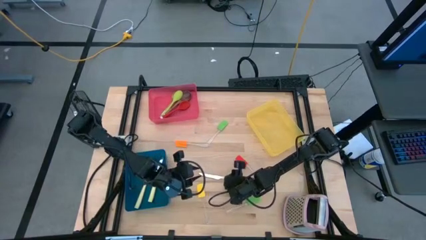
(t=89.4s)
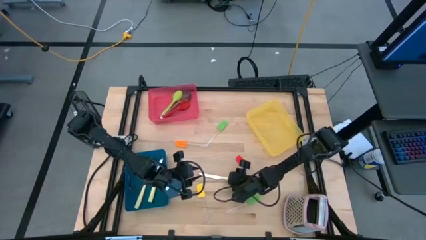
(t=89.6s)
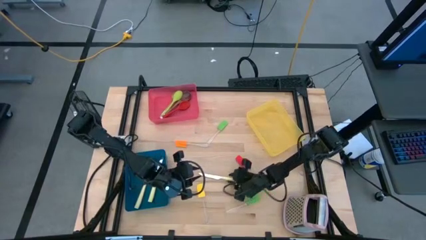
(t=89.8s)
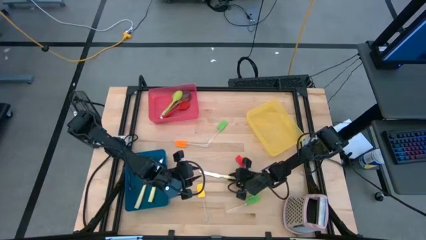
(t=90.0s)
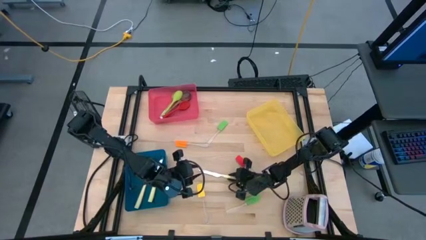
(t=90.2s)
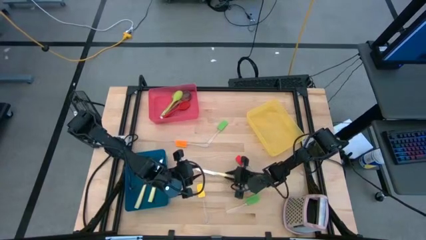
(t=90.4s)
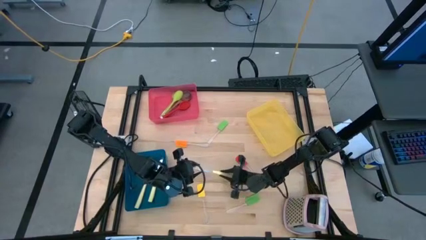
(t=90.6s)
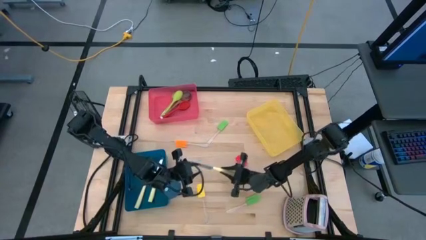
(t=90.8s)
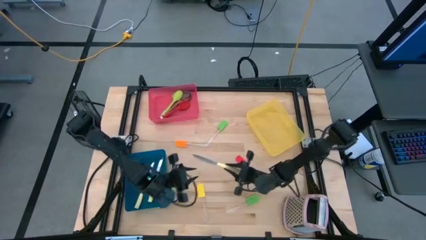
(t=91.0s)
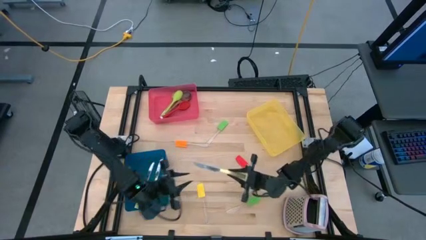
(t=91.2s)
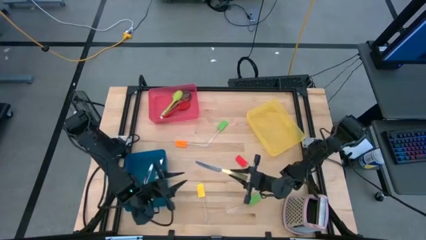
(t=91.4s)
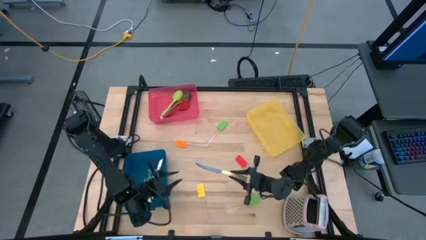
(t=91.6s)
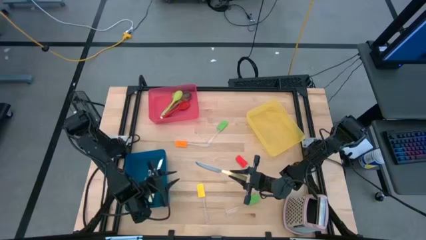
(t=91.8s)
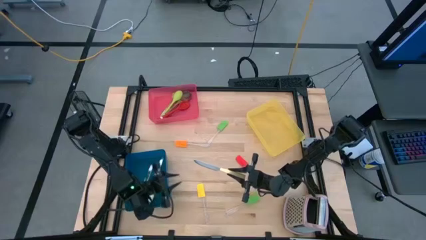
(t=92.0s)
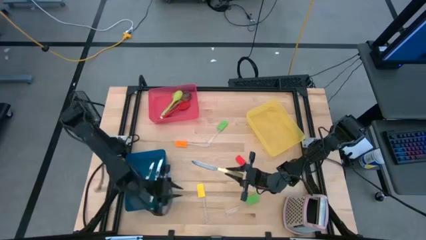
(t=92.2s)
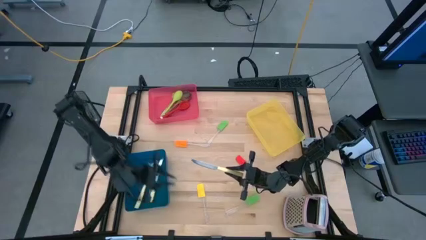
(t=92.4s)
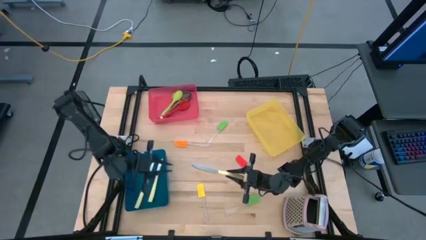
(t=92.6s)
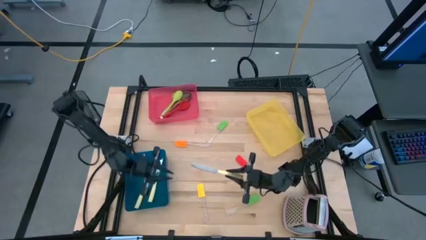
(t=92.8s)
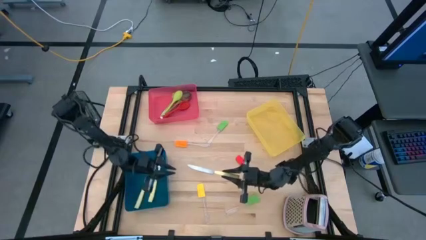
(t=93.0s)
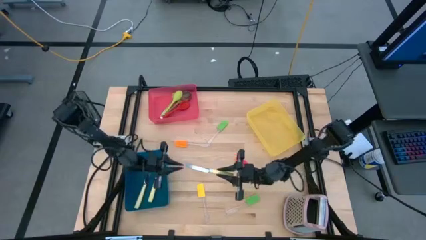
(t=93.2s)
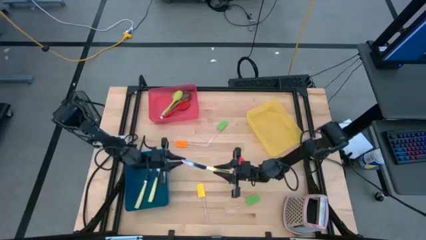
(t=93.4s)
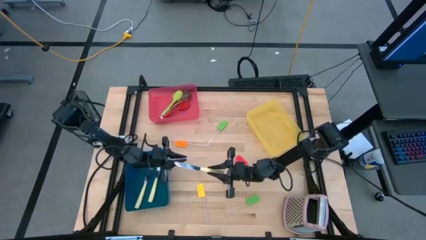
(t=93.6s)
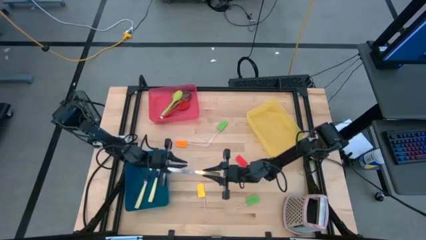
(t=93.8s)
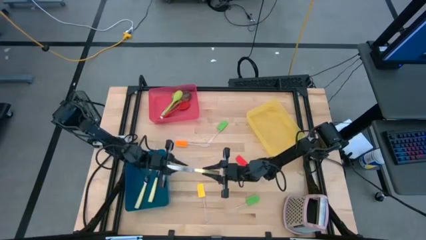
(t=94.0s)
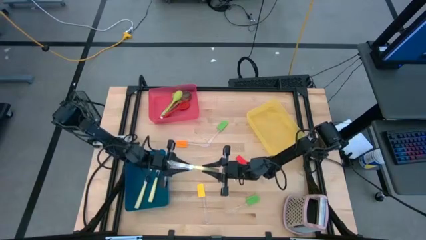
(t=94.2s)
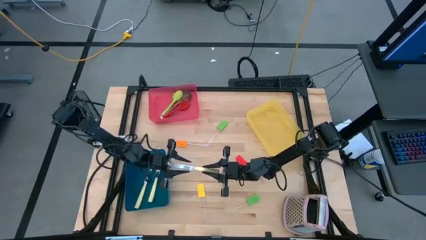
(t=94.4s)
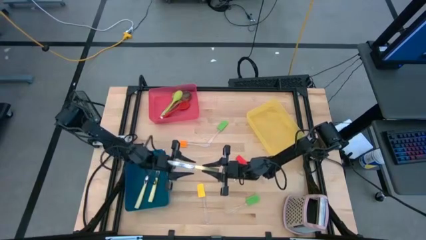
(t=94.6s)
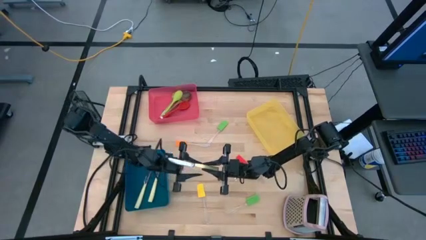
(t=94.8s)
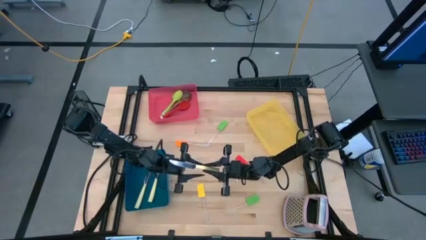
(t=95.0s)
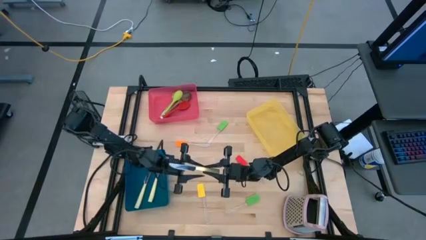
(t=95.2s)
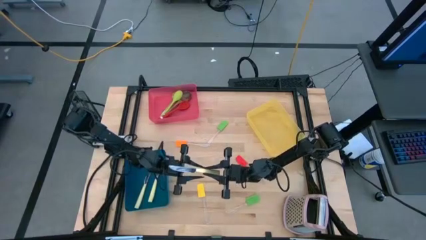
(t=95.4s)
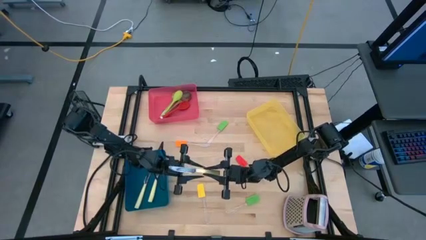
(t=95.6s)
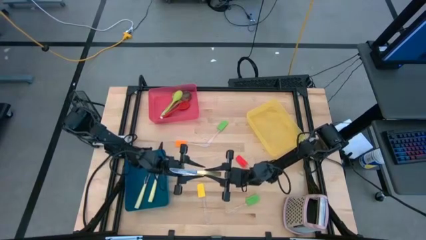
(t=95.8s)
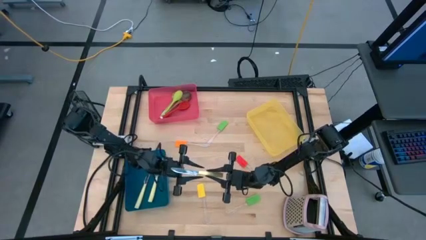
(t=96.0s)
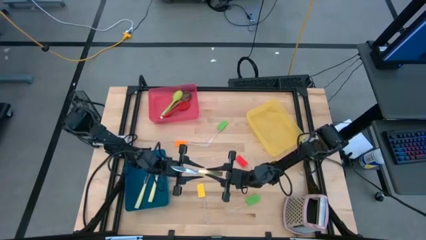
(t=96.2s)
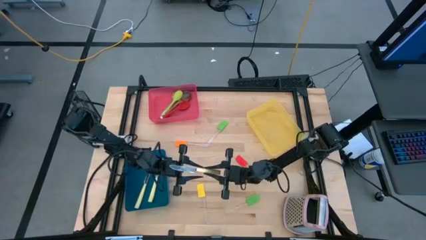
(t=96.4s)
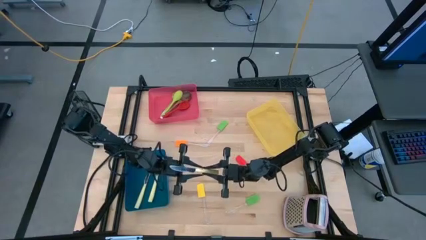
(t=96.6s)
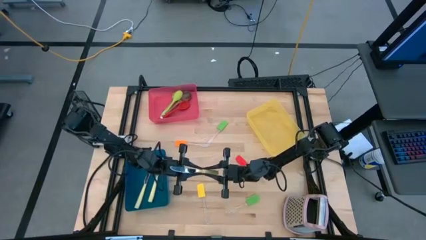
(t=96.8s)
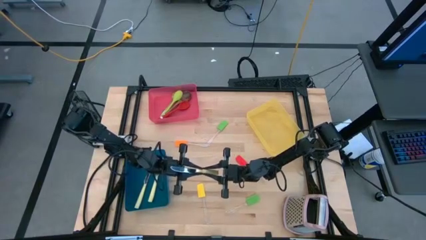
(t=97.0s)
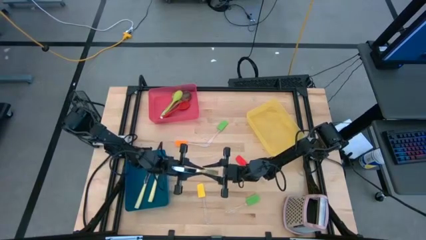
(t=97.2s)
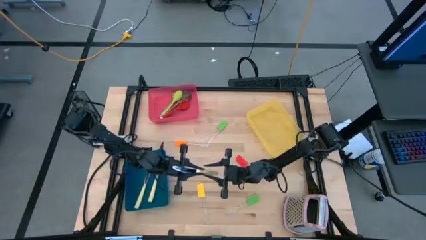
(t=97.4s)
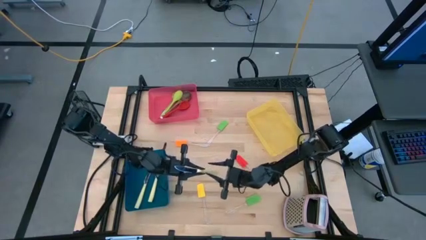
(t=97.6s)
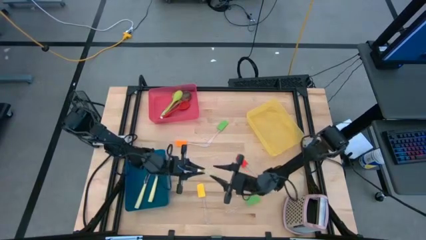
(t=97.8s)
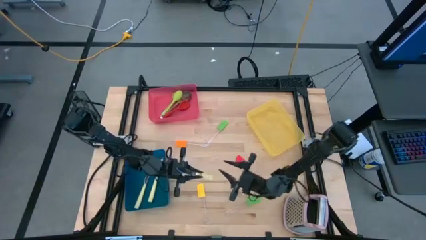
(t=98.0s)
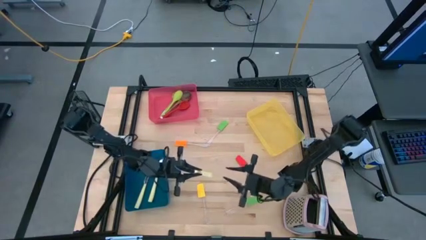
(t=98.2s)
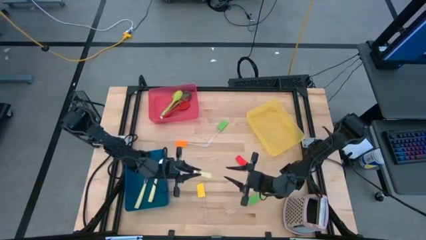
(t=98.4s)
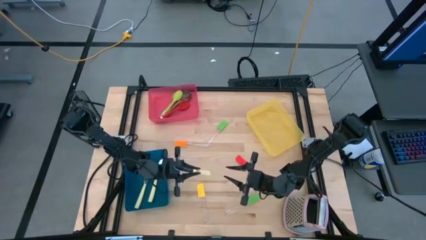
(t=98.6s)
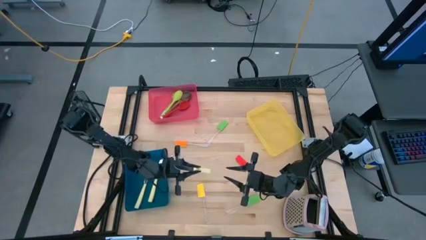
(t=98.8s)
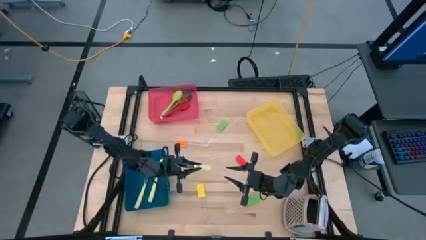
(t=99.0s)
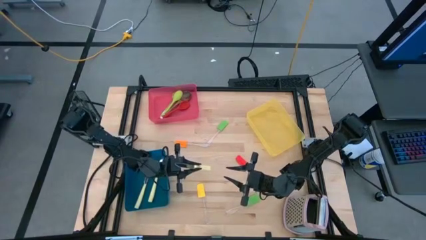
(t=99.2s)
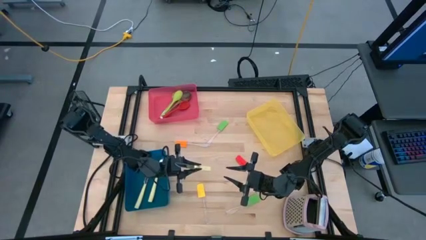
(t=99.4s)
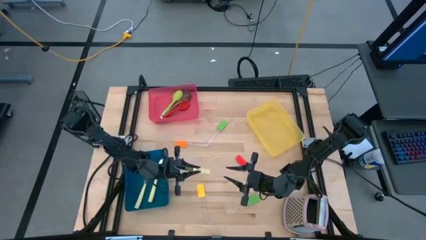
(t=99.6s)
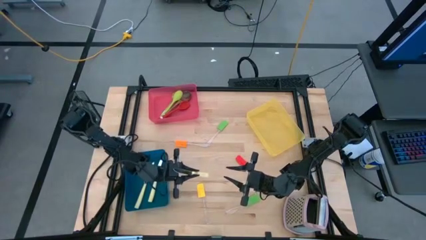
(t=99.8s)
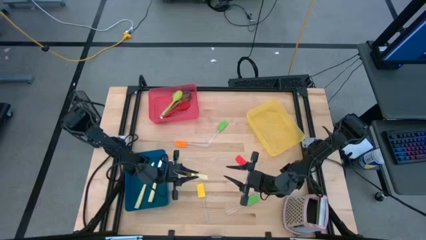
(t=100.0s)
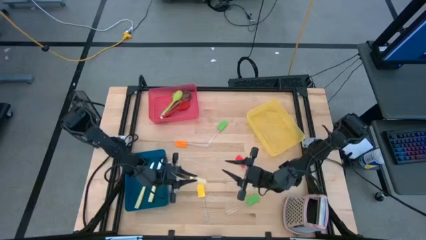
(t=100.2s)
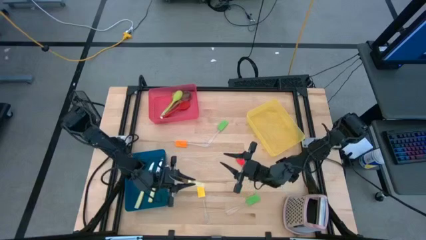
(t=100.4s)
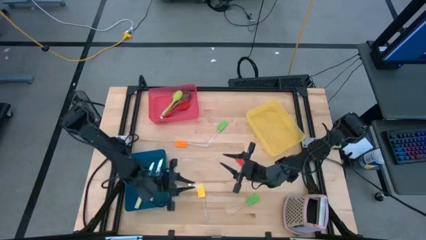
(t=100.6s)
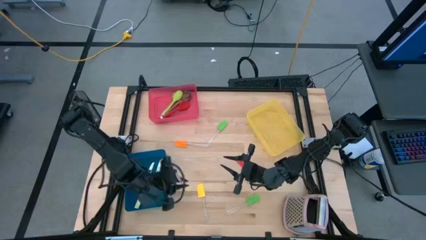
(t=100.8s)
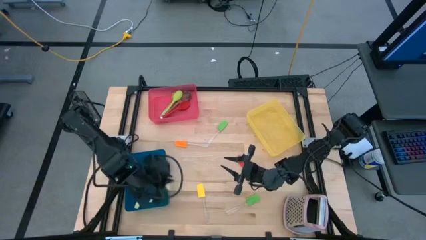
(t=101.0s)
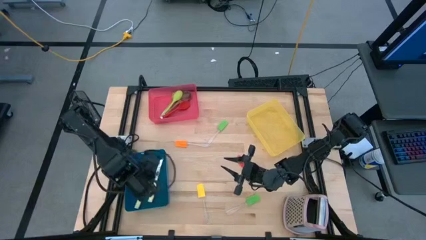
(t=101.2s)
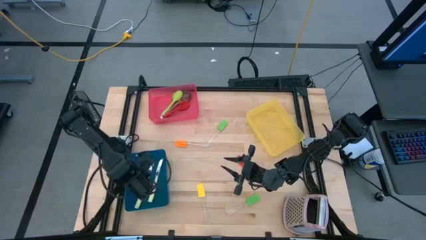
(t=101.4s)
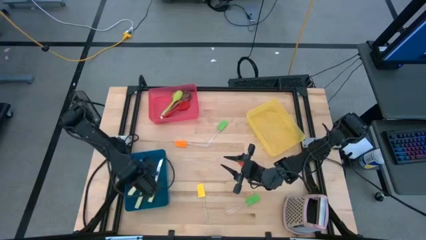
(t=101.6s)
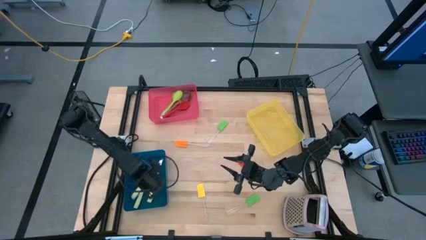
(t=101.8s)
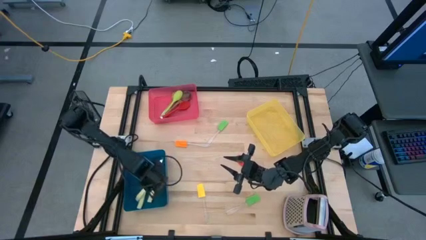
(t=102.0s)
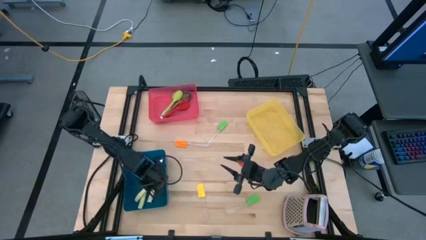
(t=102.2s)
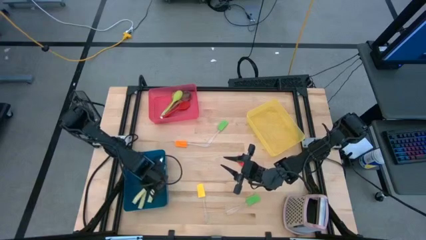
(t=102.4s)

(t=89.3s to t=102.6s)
Task: Pick & Place Kitchen Items
Put the kitchen knife into the blue bin
